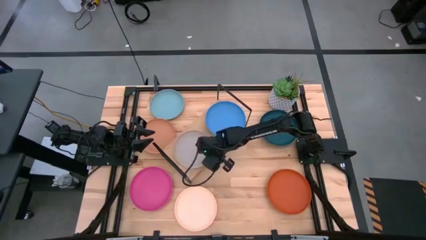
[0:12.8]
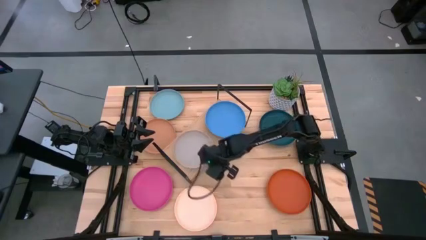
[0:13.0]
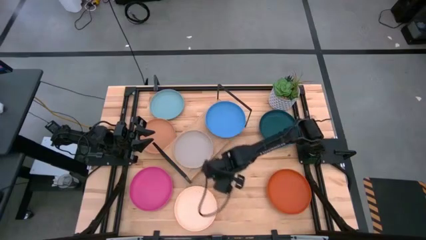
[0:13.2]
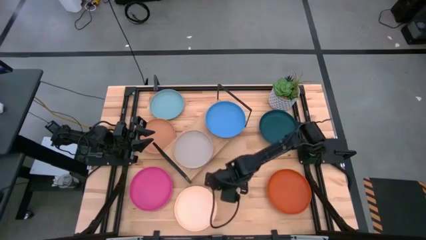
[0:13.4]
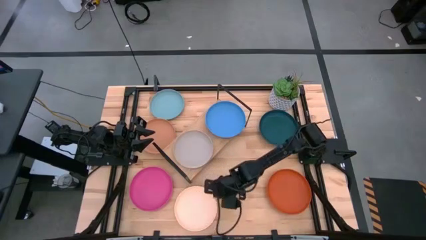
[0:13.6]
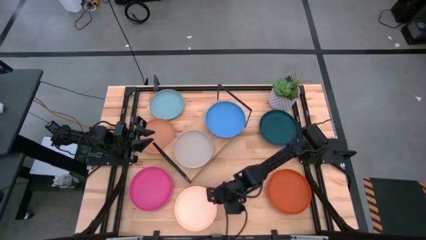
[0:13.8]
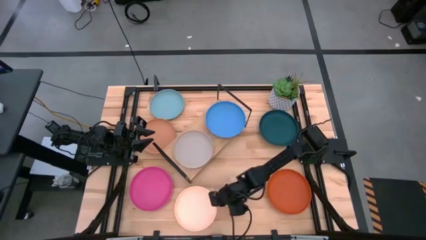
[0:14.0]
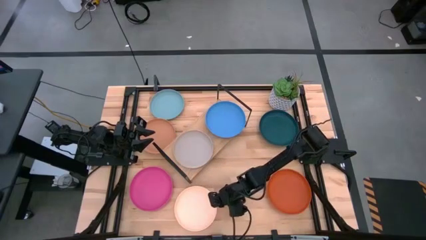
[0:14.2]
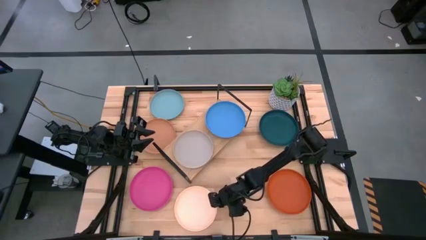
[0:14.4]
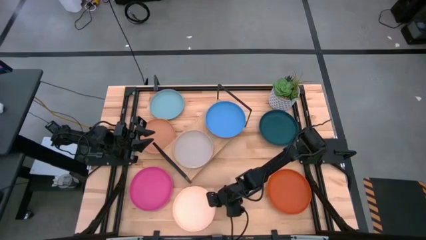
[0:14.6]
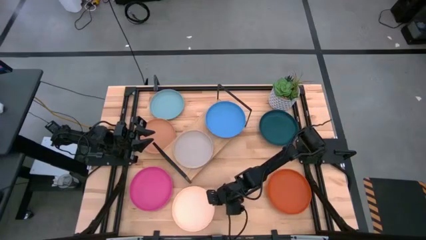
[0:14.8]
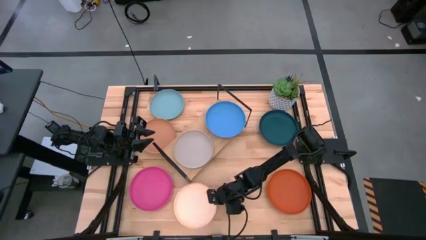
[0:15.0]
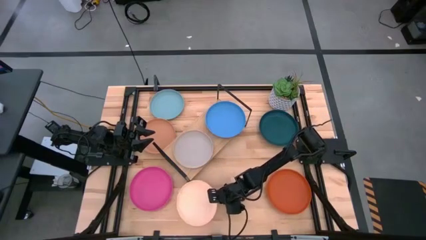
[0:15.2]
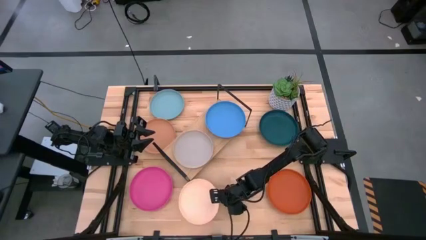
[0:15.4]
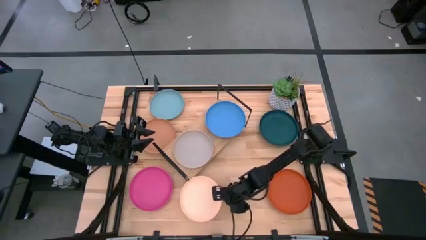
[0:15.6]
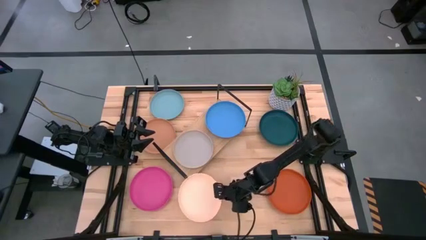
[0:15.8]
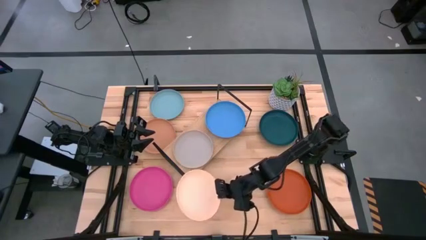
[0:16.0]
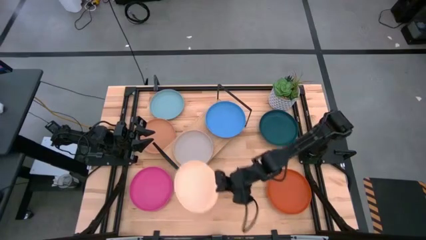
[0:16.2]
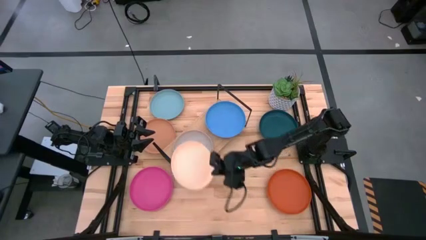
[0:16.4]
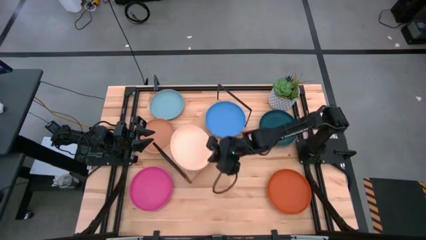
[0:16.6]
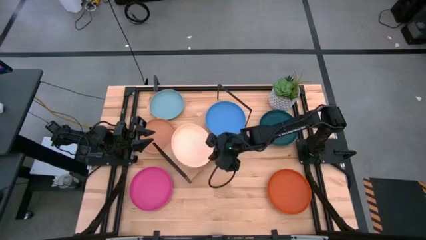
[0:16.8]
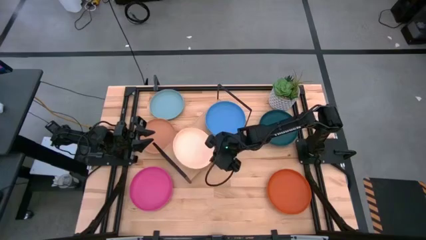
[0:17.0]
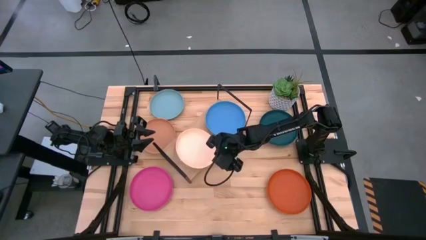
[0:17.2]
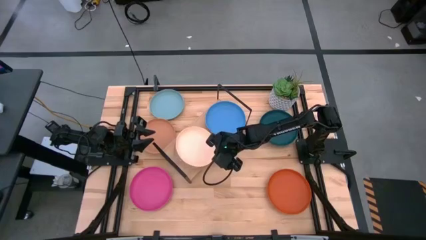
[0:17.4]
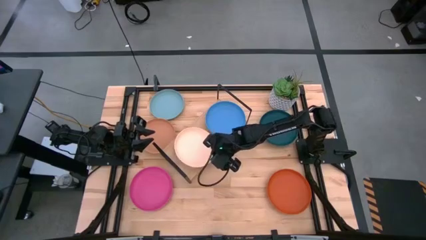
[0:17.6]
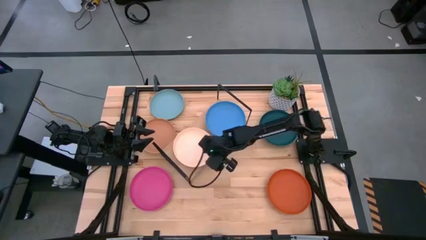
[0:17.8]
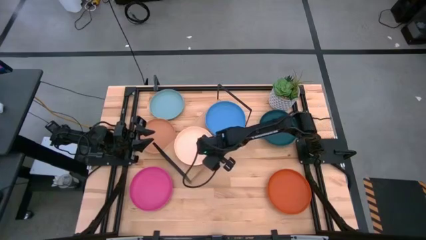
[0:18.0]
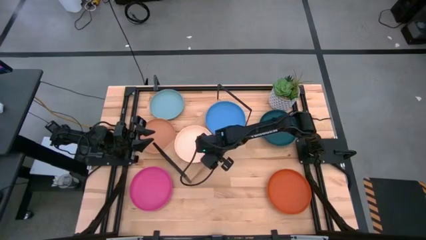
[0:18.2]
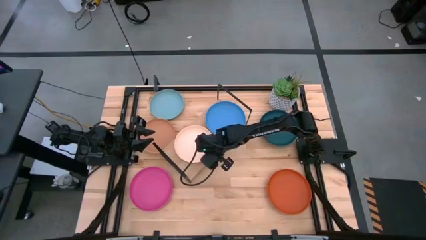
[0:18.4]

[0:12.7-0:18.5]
Task: Place and stack plates onto a shelf
Stack the light orange plate on top of the gray plate on the shelf

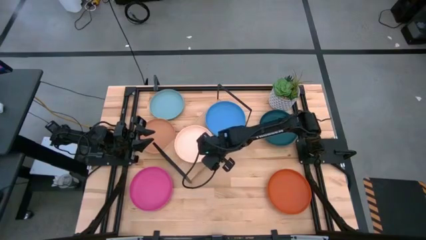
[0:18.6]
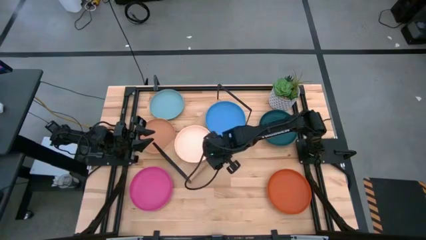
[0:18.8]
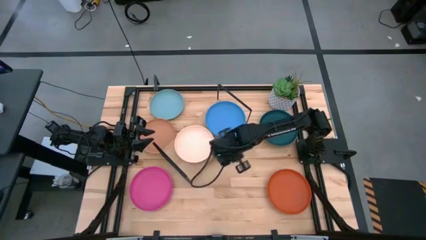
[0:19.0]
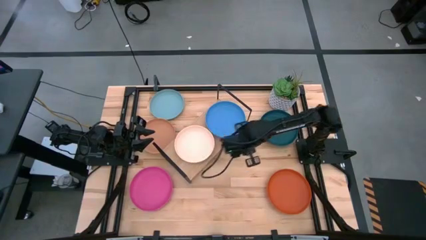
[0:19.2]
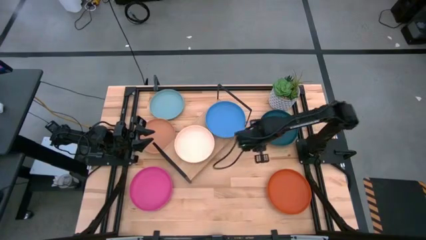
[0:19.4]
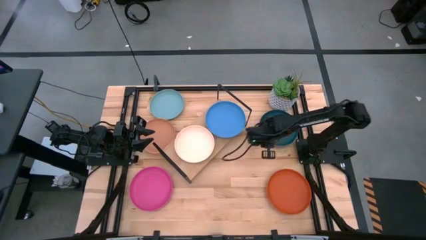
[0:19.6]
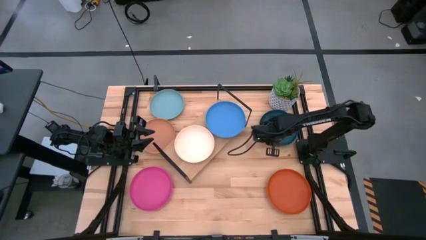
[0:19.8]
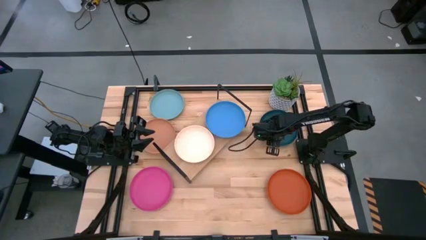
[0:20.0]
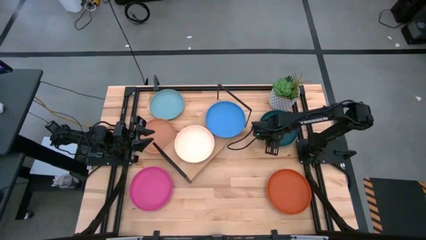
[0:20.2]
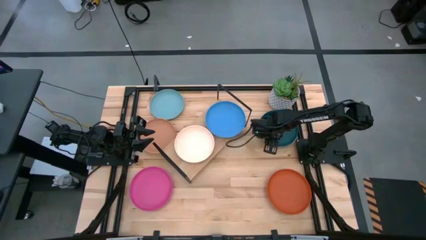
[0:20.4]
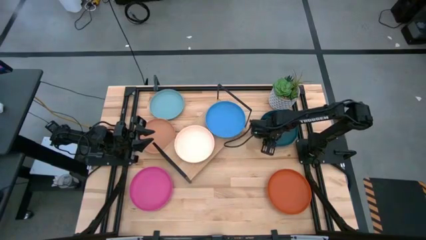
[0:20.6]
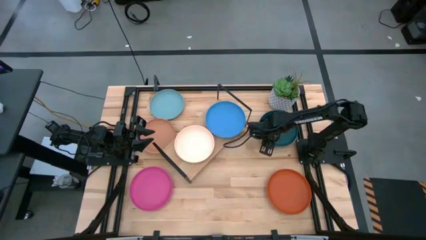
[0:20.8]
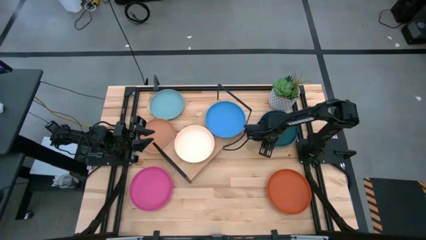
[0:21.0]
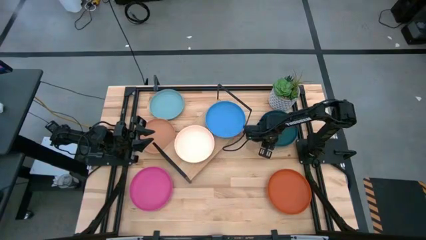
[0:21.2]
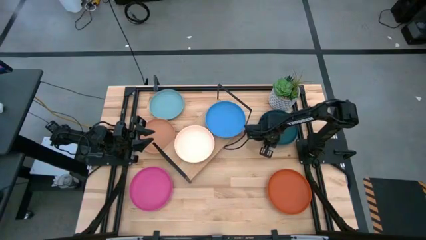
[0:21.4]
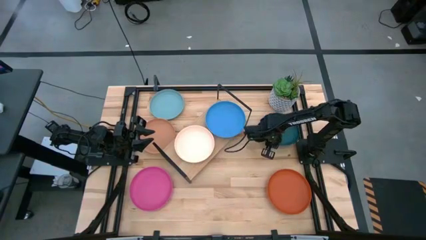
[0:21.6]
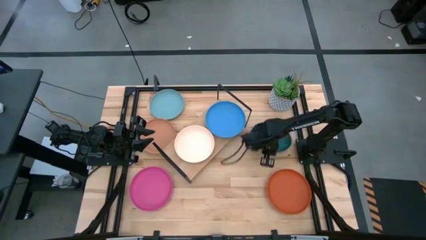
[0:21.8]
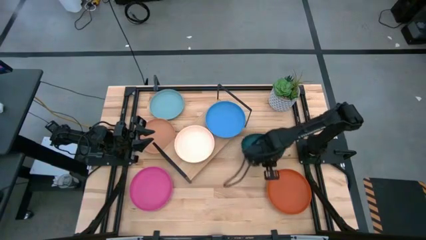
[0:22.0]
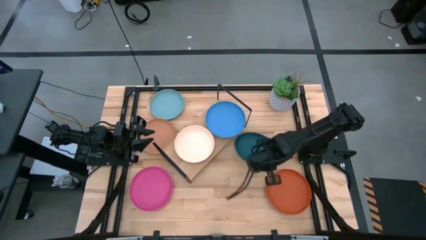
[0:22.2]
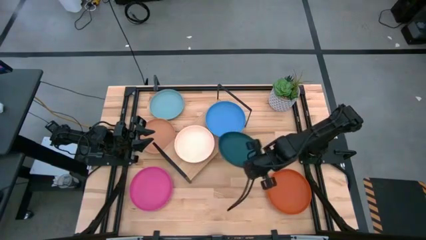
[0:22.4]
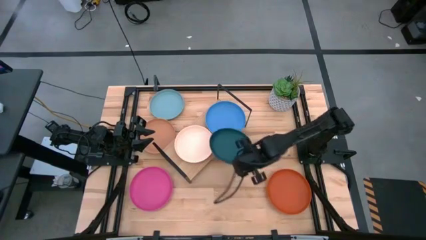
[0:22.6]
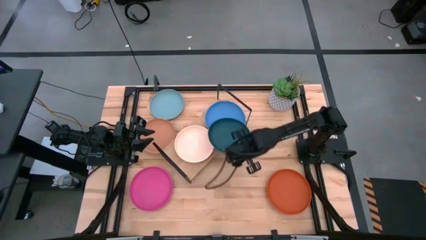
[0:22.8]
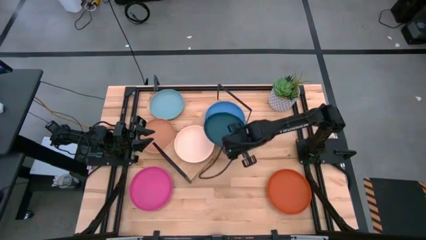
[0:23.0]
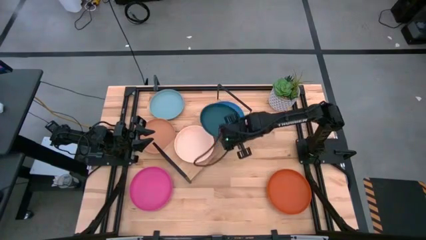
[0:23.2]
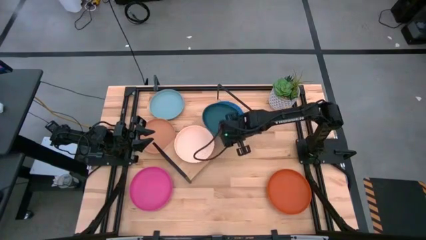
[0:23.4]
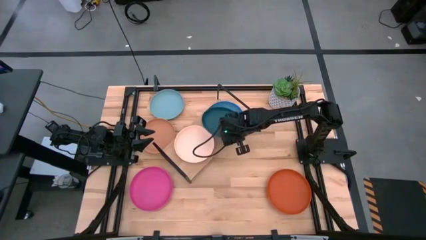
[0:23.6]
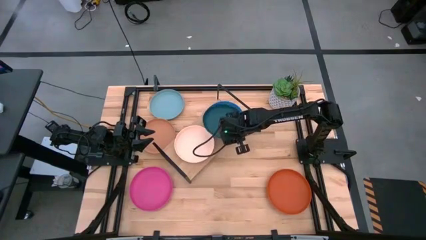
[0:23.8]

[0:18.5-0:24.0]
Stack the dark blue plate on top of the blue plate on the shelf

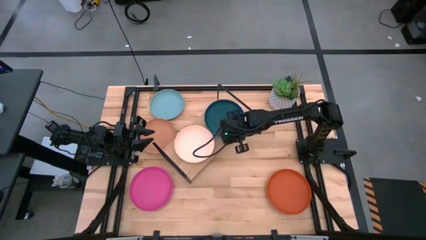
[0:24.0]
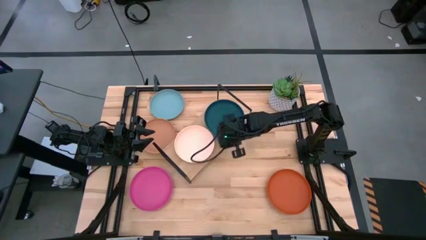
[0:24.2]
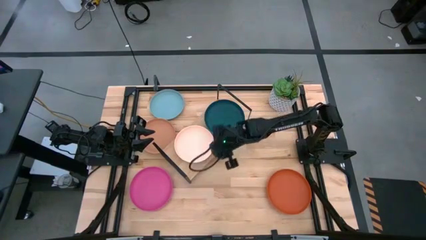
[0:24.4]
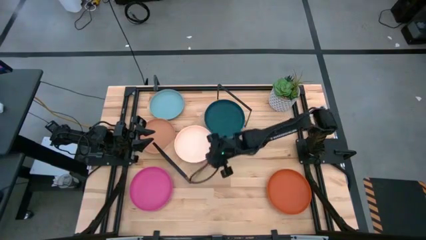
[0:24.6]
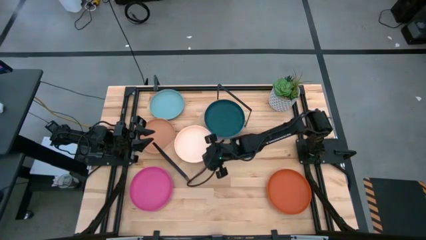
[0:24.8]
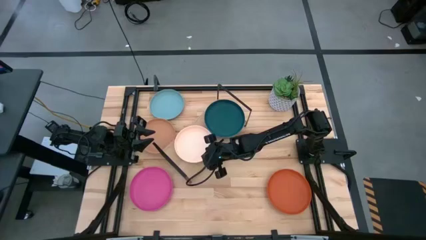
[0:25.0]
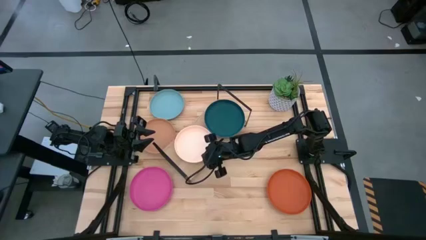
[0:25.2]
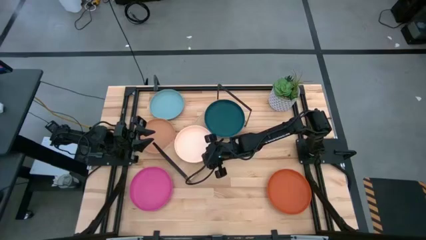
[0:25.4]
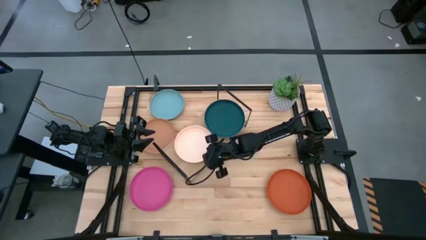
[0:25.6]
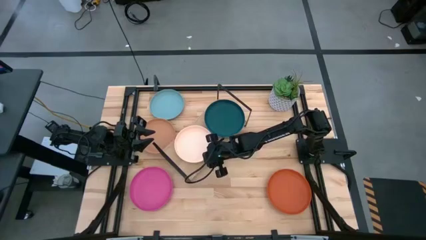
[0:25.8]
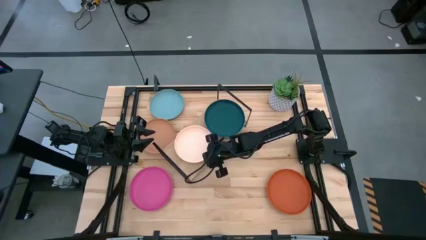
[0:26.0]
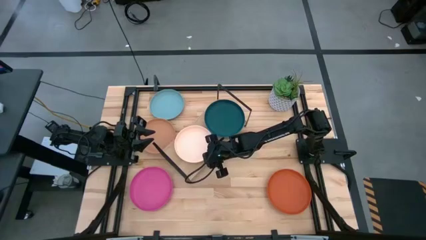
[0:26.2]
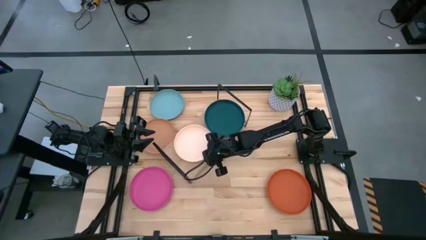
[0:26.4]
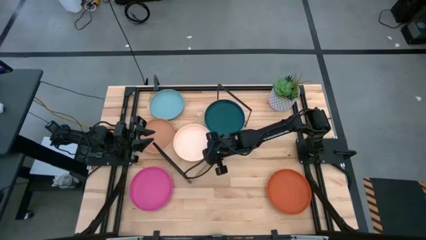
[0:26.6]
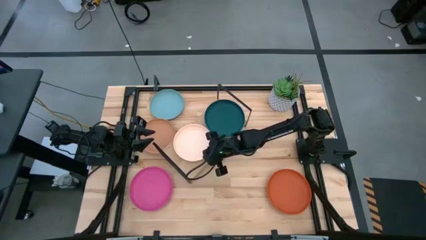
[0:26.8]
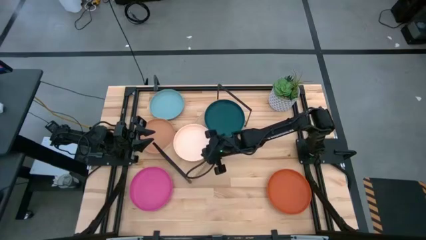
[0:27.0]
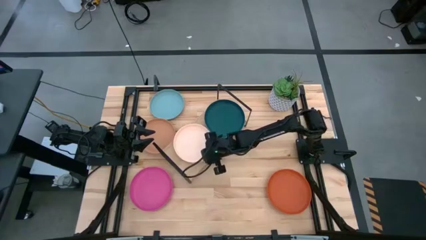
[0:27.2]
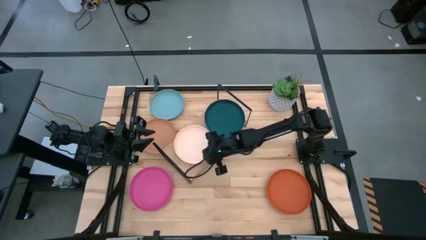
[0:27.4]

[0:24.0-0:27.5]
Adjust the light orange plate on the shelf

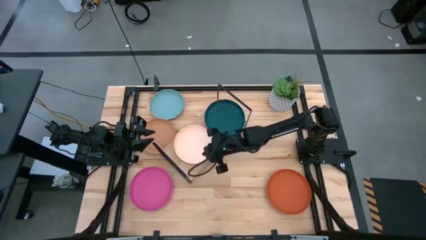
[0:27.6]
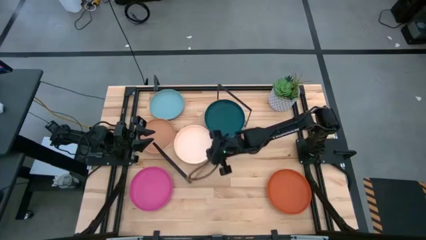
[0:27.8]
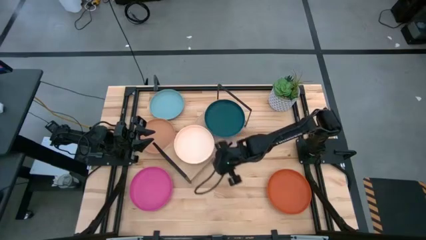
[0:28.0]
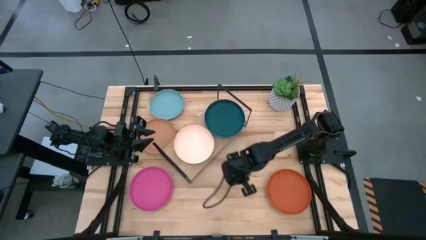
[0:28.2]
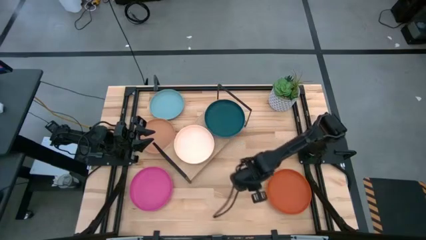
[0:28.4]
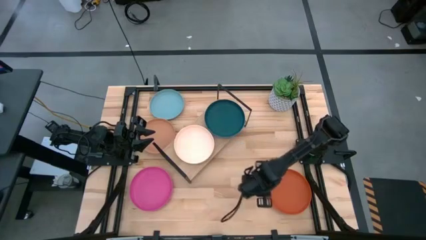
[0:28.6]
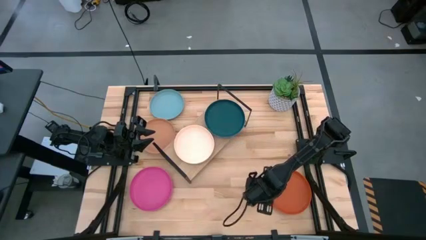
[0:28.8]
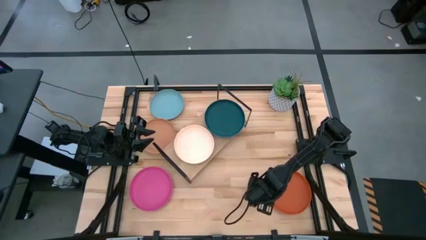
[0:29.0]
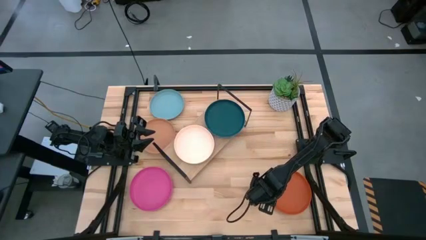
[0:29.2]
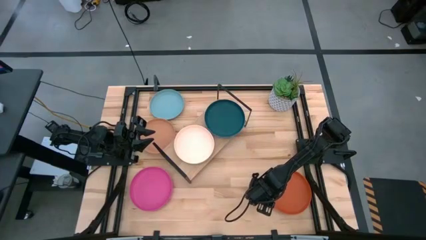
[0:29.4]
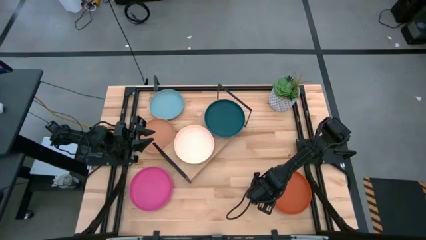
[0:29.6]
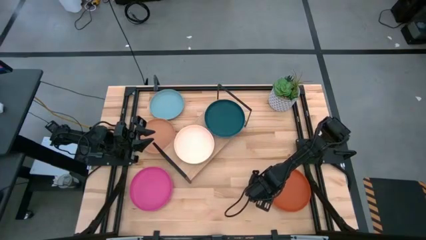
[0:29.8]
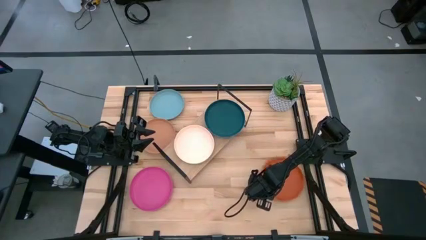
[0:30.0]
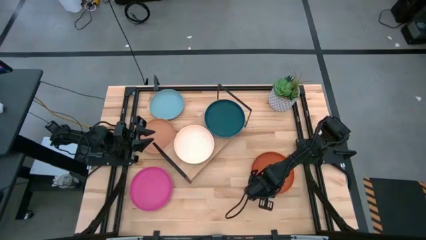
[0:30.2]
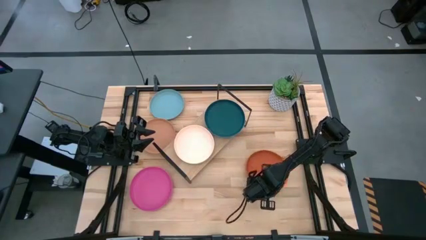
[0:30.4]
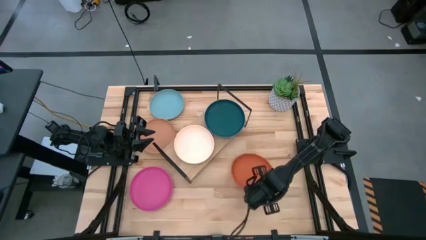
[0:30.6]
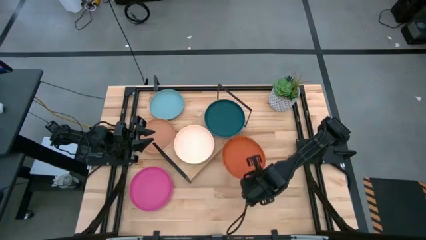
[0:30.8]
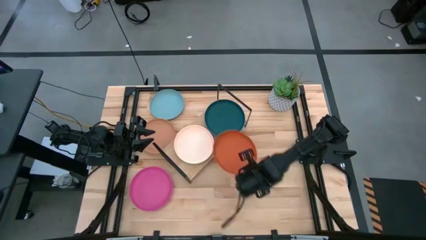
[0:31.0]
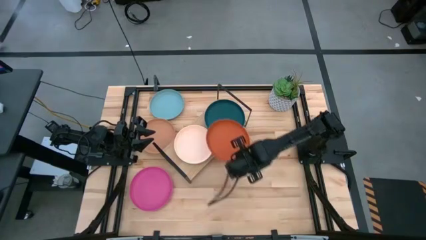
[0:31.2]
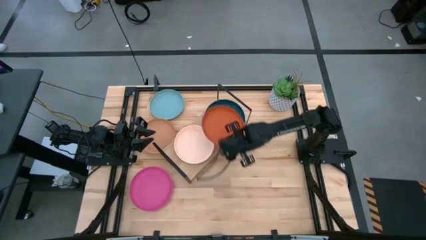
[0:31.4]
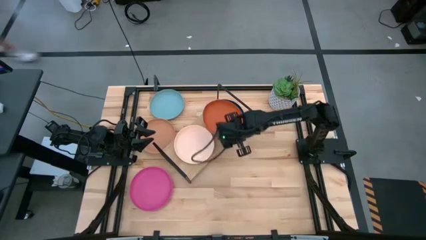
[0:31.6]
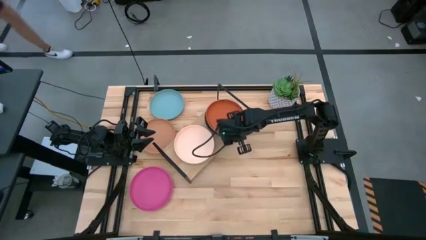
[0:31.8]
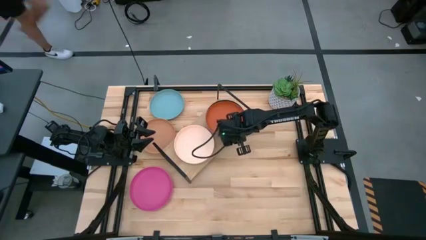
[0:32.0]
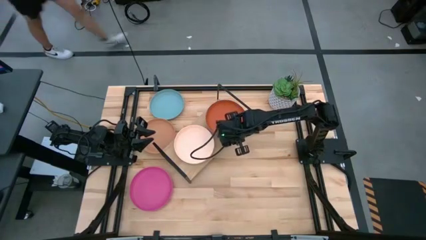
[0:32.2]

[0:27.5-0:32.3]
Stack the orange plate on top of the dark blue plate on the shelf
